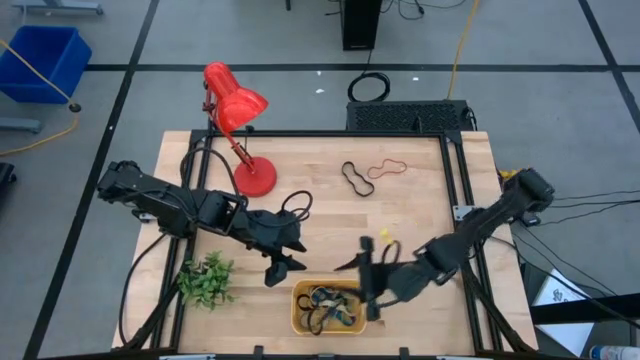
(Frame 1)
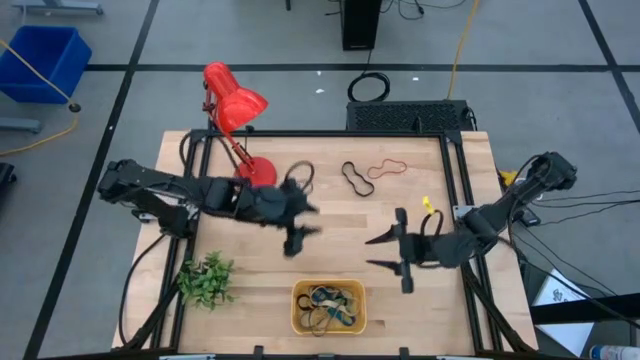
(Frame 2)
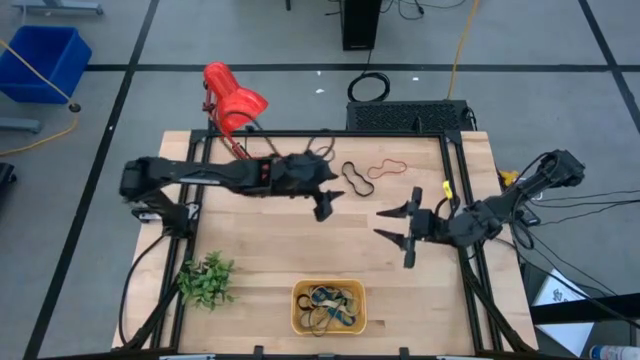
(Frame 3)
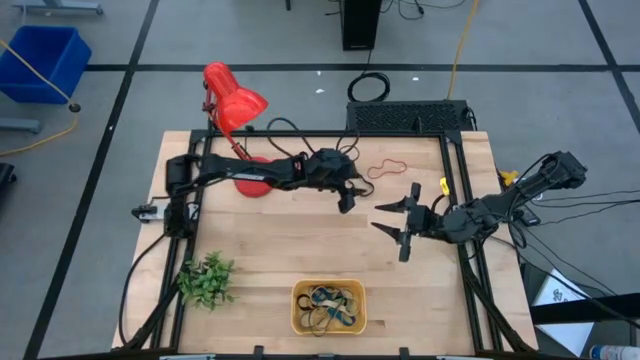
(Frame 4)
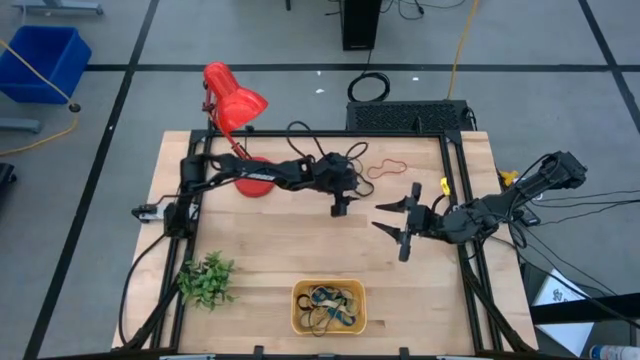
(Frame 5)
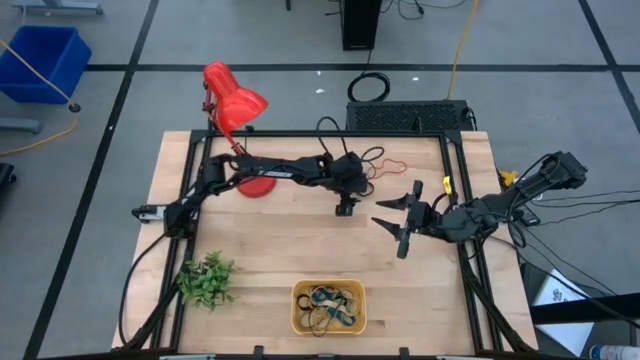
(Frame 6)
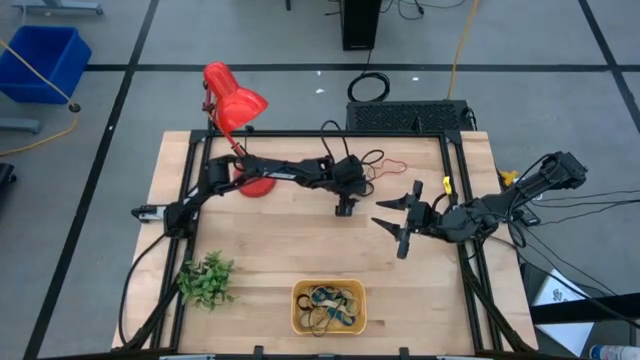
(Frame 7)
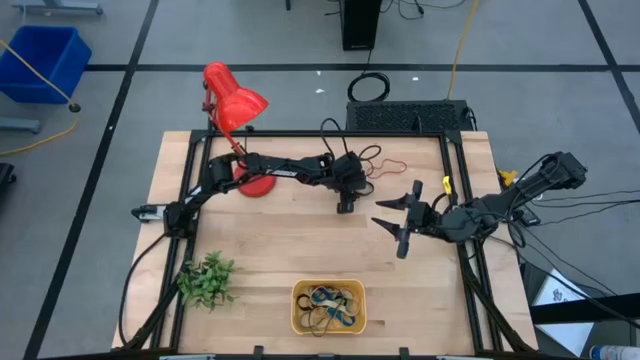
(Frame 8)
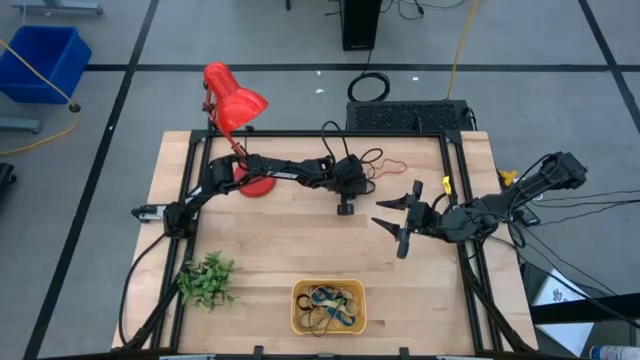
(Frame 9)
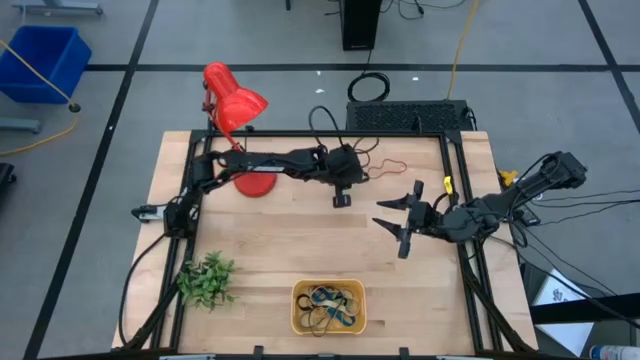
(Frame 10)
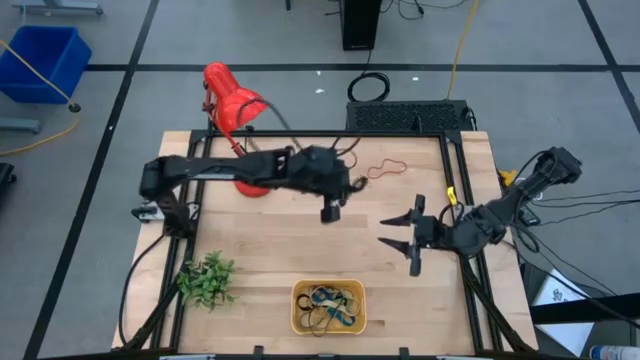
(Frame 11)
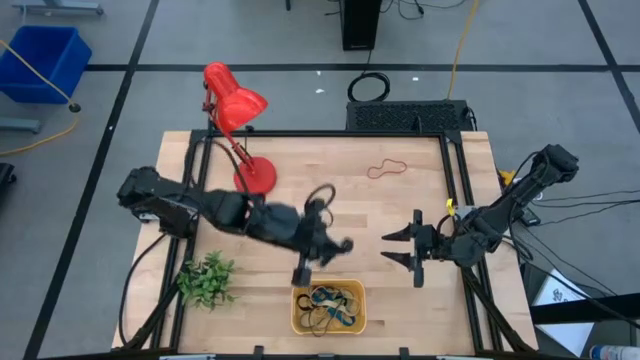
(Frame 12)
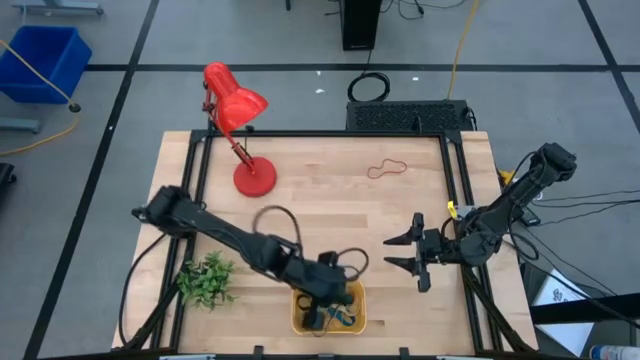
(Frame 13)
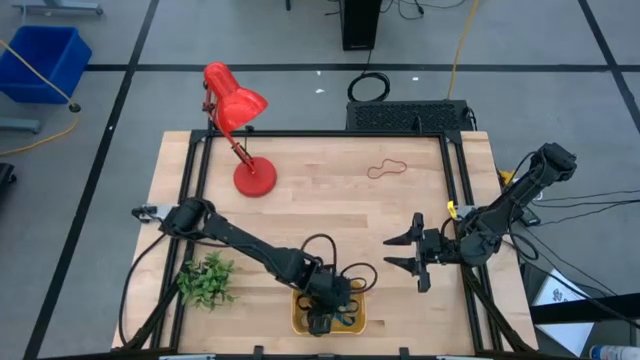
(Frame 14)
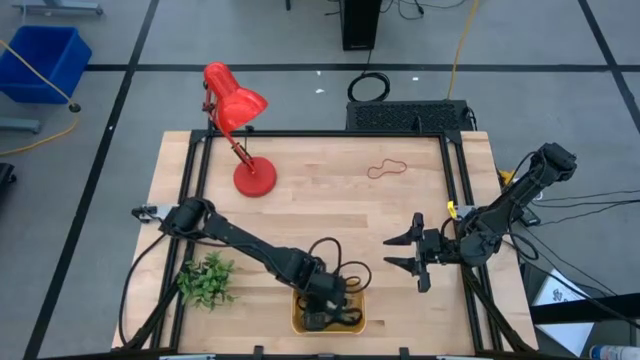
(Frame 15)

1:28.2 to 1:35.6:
Task: Pick and place rubber bands into bin
Put the black rubber band into the bin

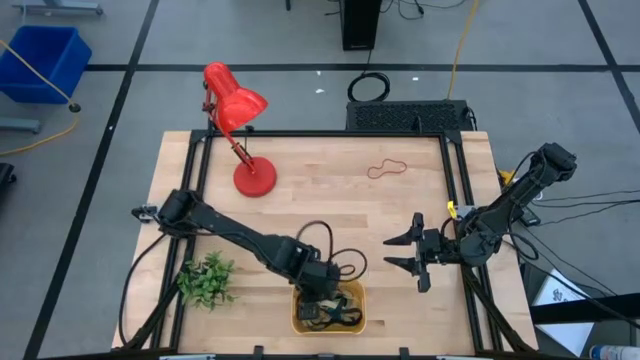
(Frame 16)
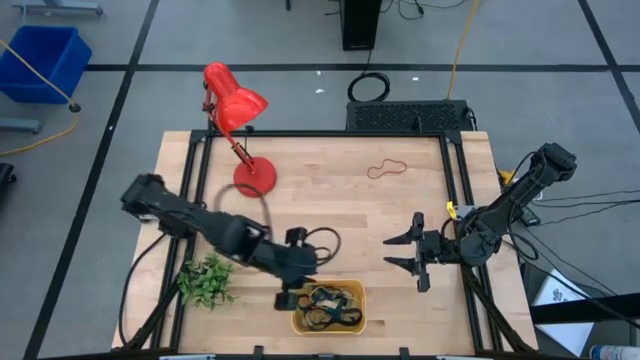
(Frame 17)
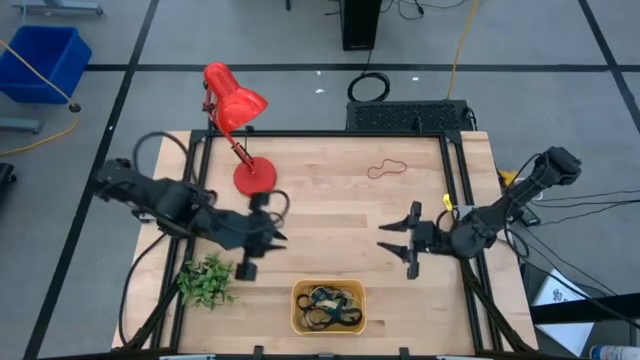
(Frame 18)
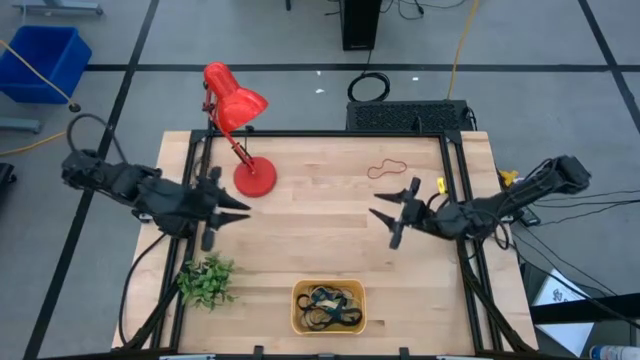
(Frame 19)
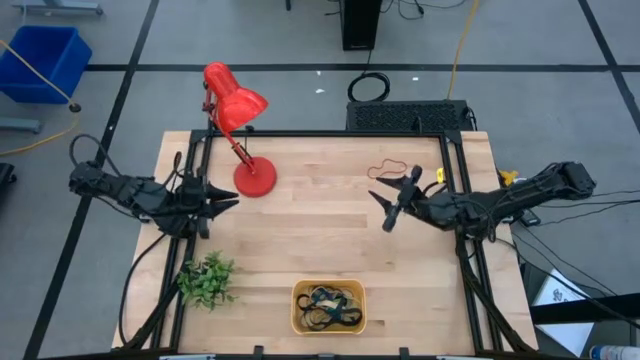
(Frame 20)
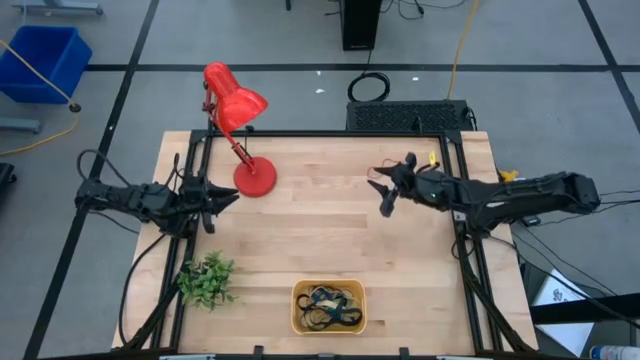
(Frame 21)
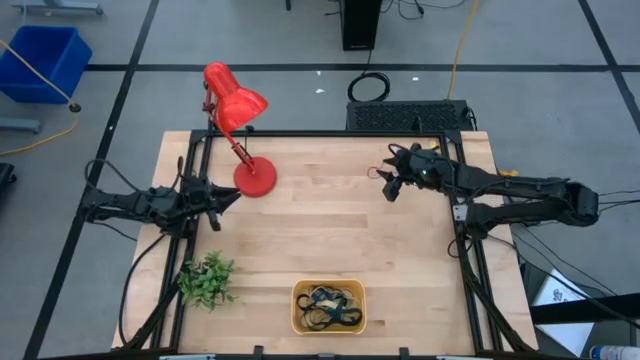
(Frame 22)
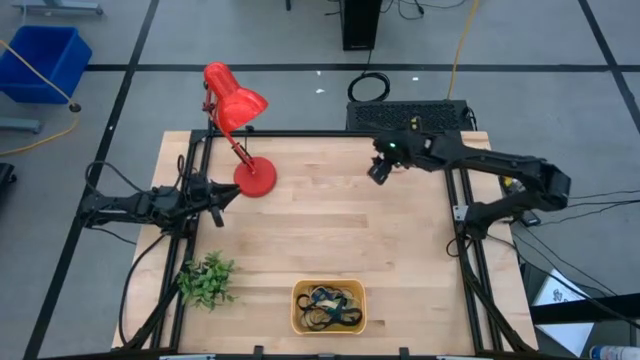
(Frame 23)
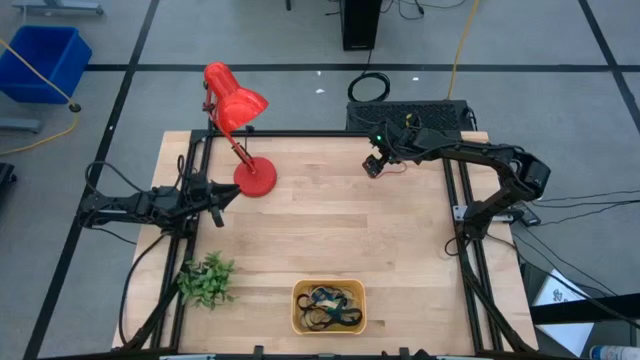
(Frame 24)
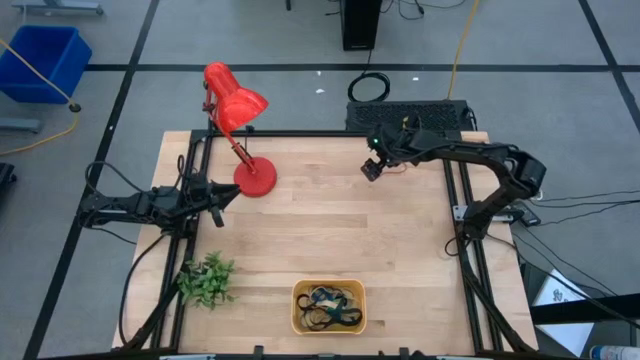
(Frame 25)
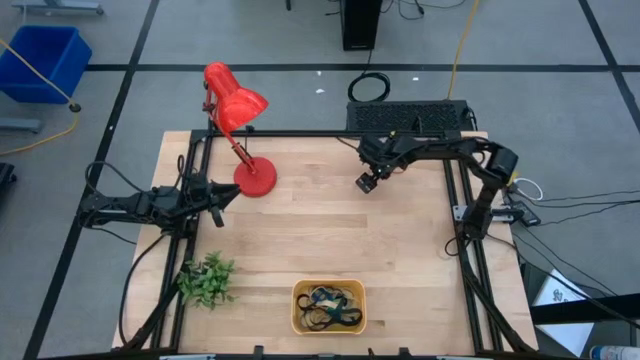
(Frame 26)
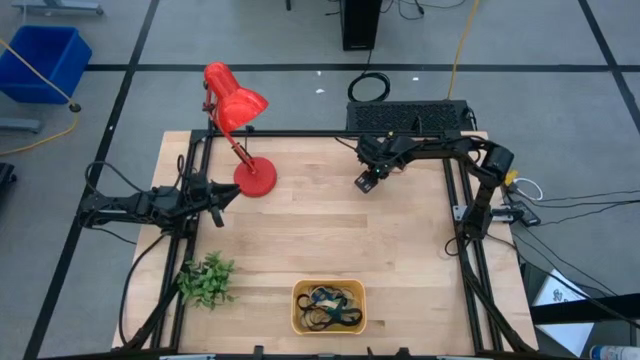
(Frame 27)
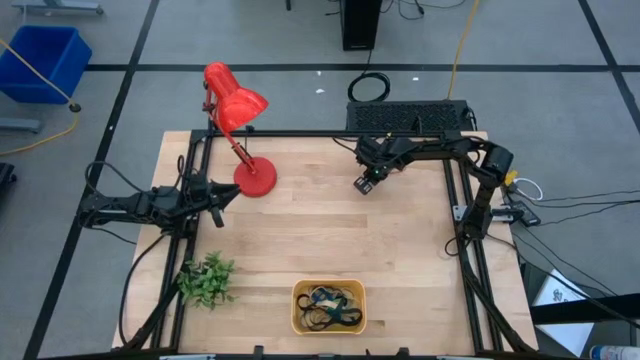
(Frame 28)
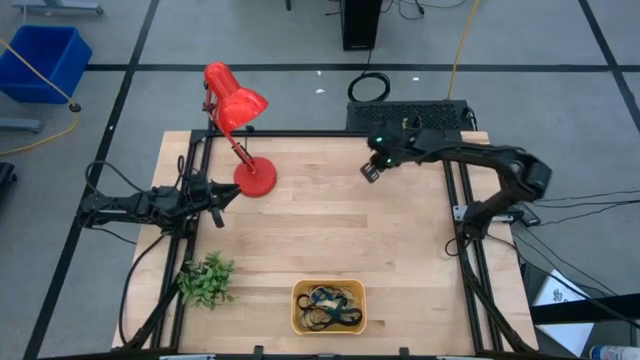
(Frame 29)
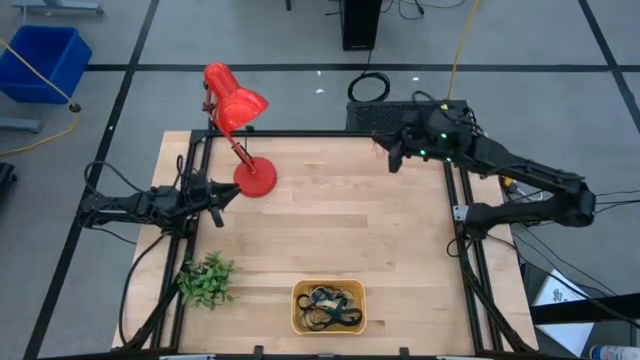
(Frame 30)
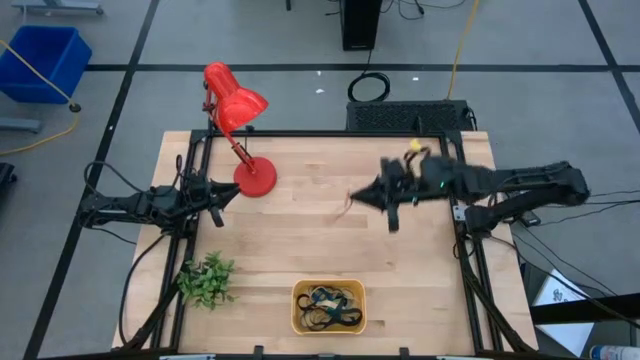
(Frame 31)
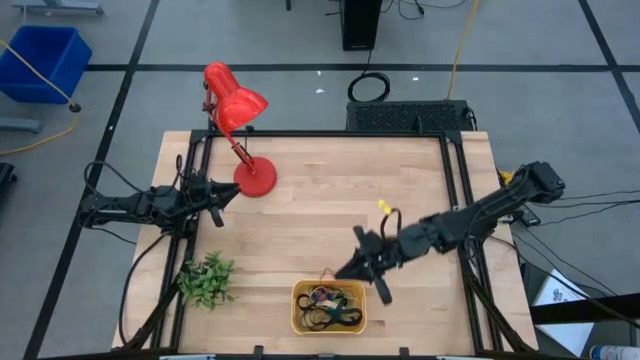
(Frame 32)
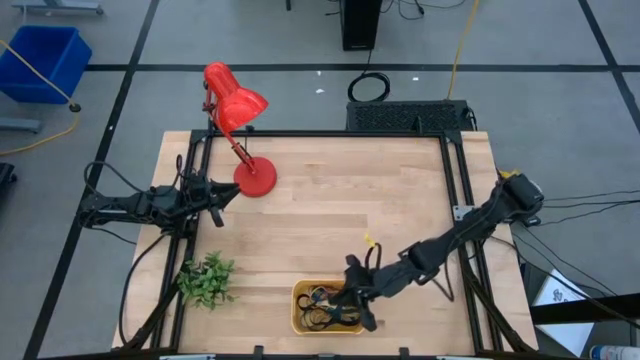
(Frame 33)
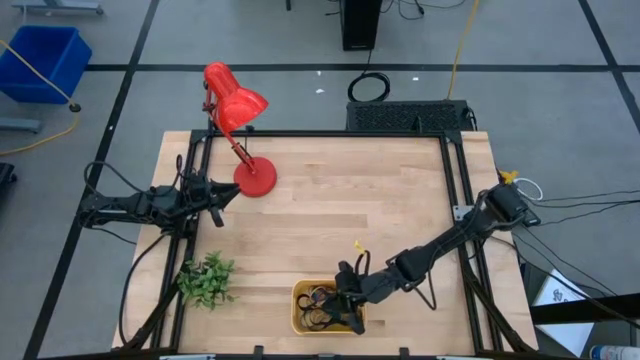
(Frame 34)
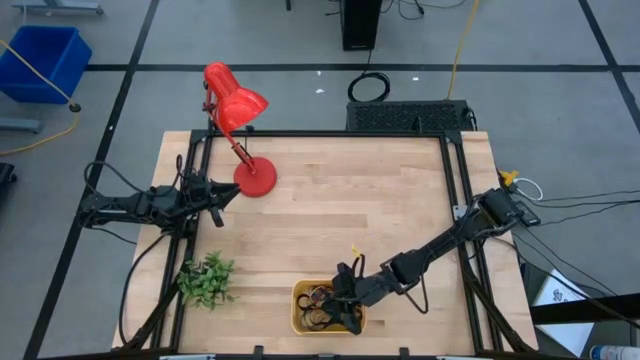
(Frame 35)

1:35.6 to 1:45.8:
Put the red rubber band into the bin

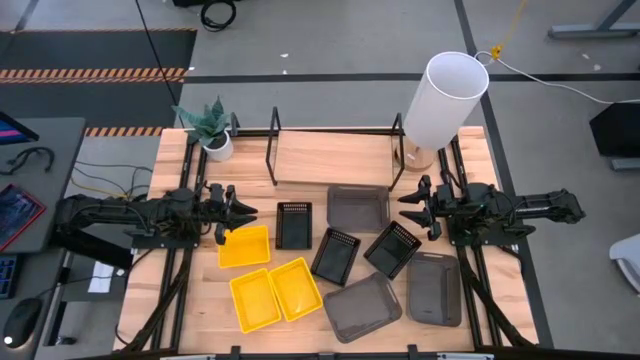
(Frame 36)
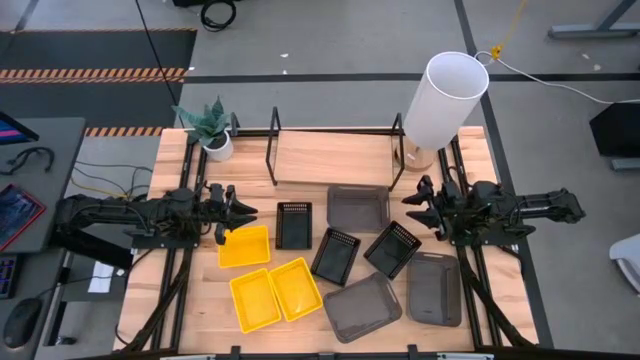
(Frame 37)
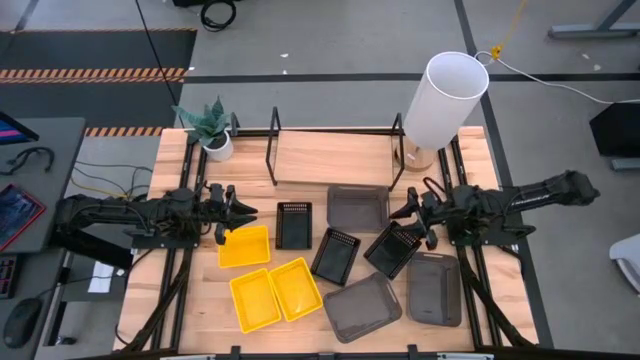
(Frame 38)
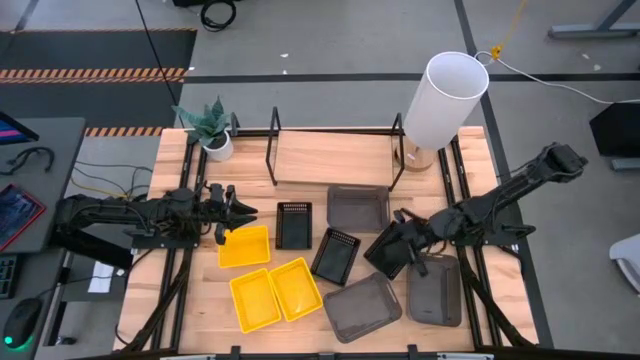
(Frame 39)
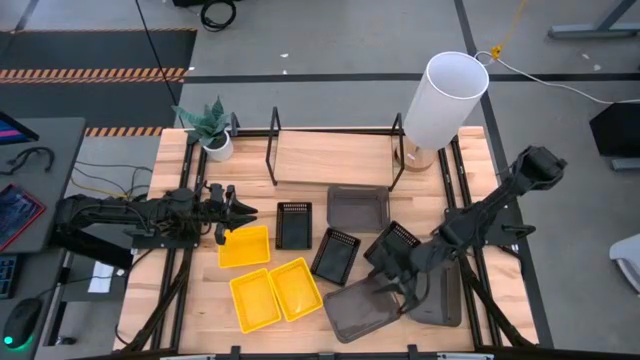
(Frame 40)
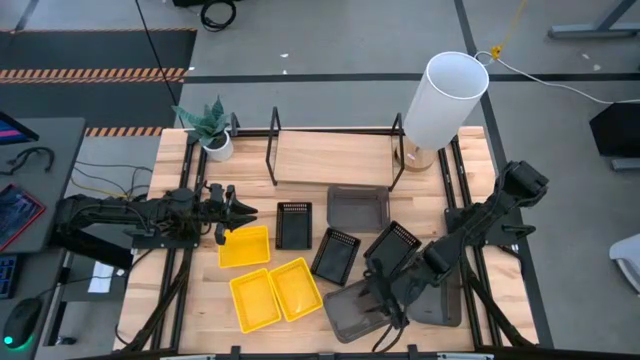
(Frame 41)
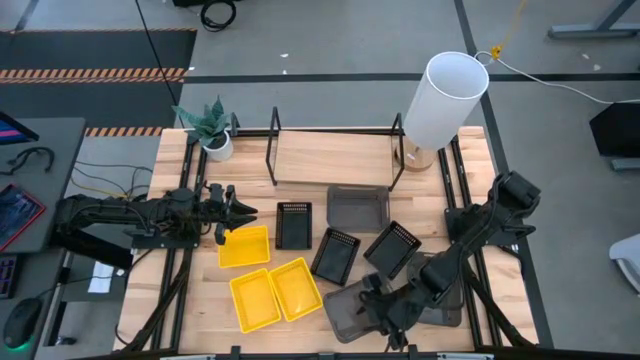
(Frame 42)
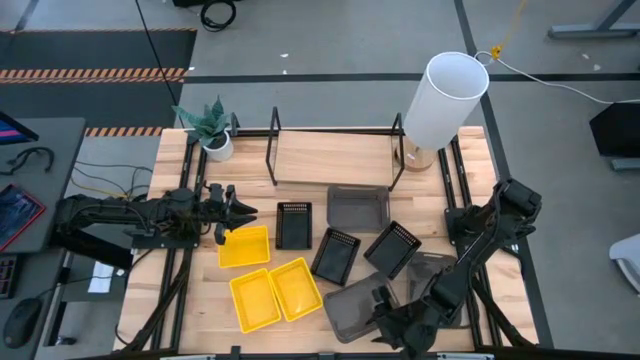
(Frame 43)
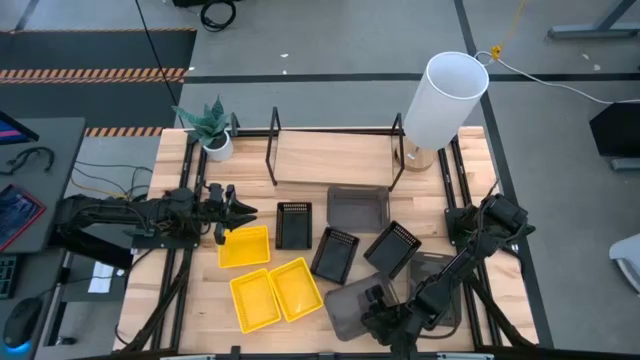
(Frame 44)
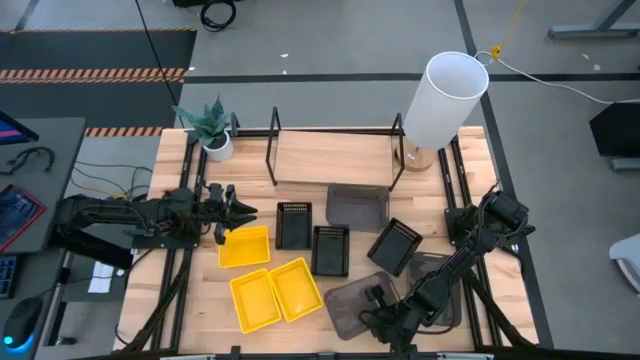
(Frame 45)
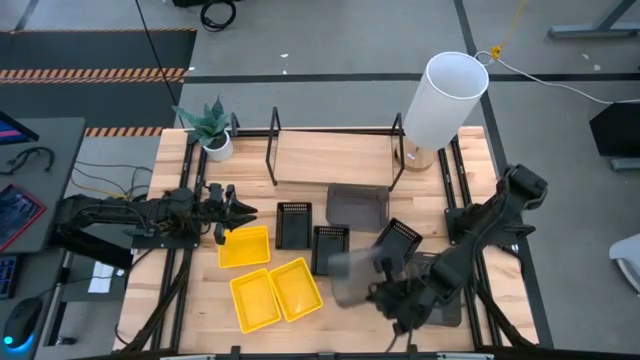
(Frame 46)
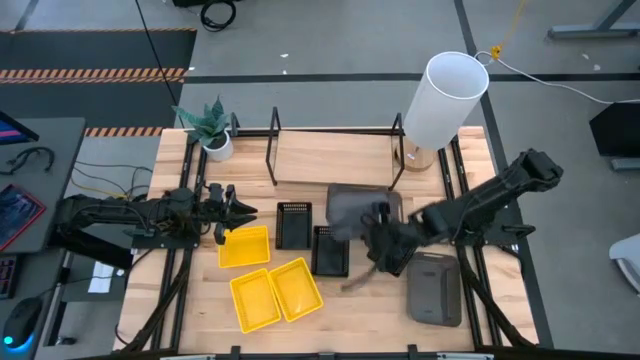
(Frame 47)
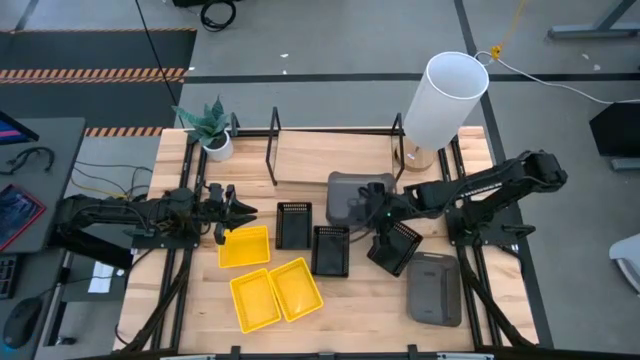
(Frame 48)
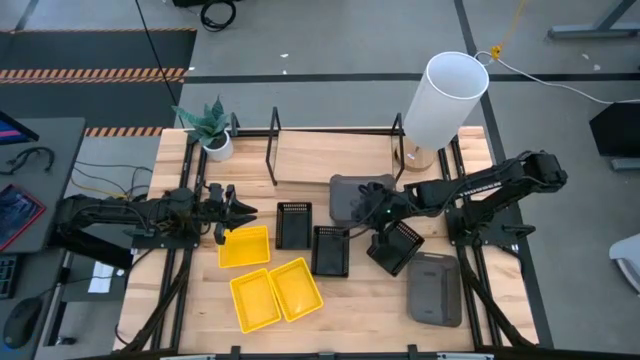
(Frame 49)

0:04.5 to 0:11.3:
Task: Stack baskets on shelf by color
Stack the bottom left gray bin on top of the top gray bin
